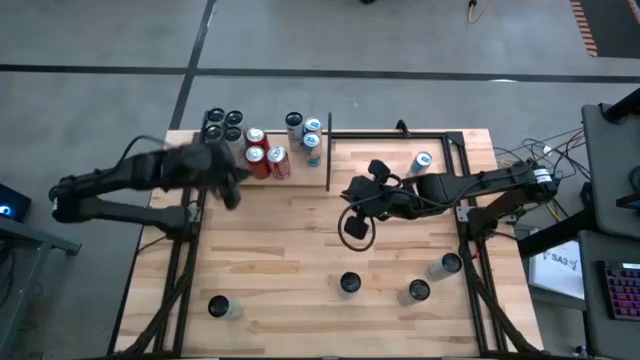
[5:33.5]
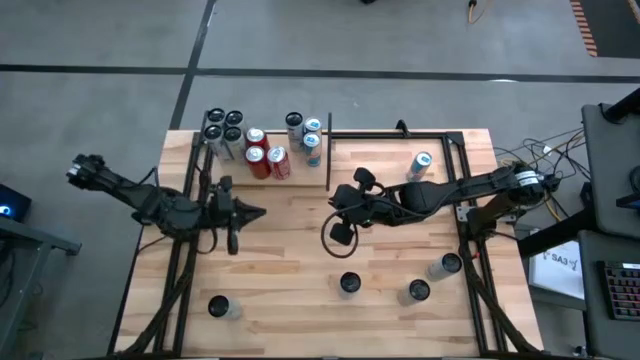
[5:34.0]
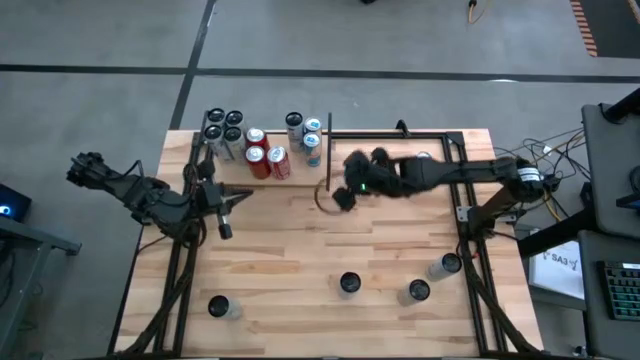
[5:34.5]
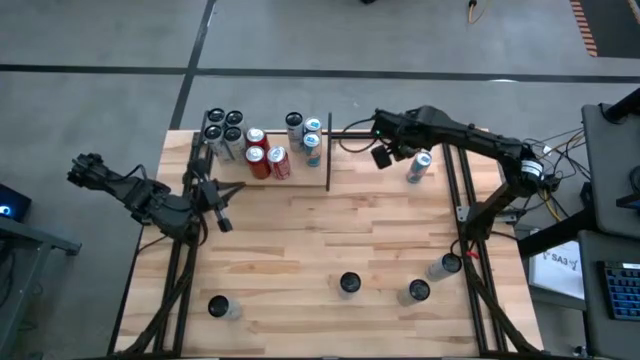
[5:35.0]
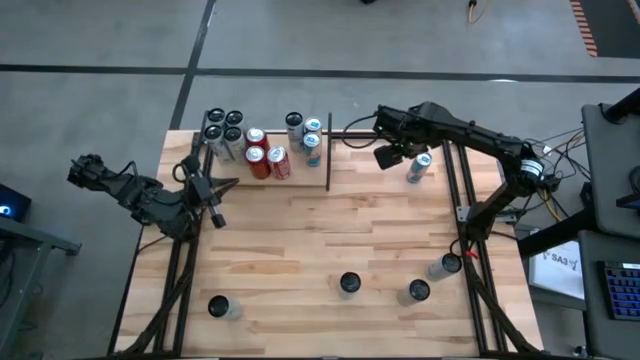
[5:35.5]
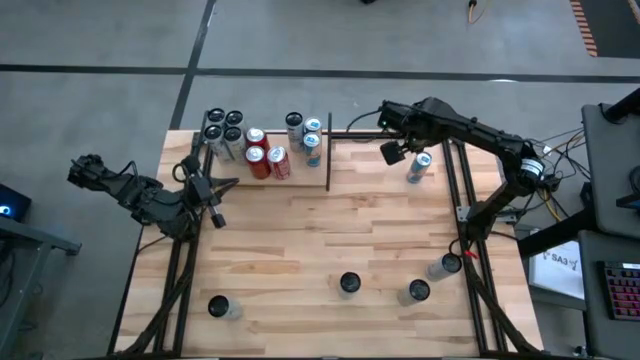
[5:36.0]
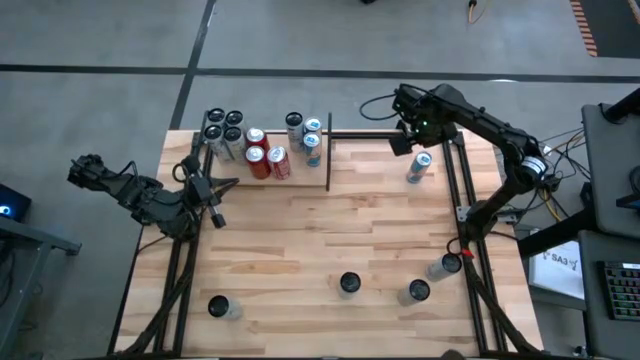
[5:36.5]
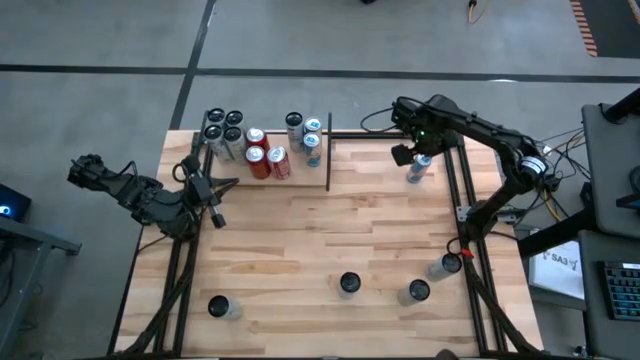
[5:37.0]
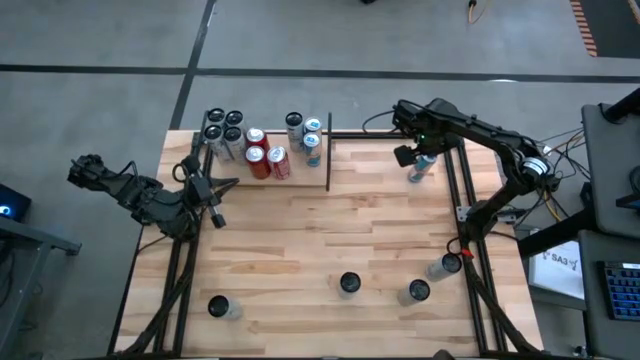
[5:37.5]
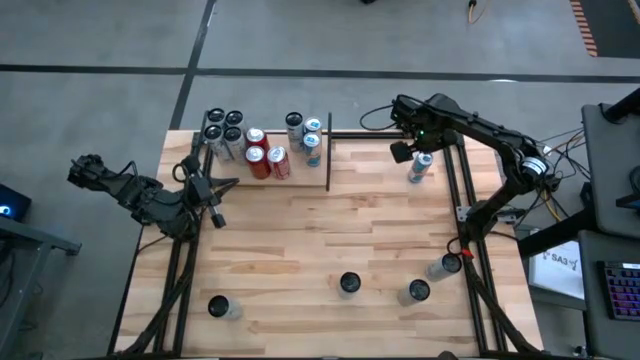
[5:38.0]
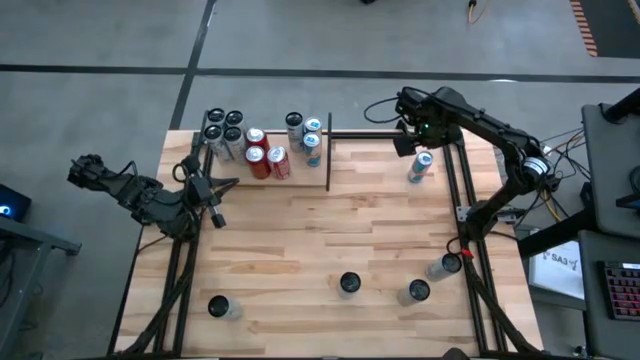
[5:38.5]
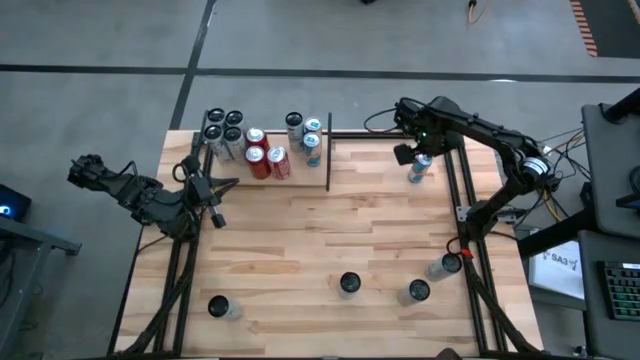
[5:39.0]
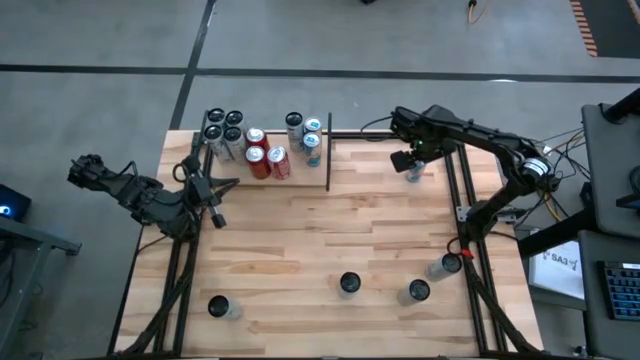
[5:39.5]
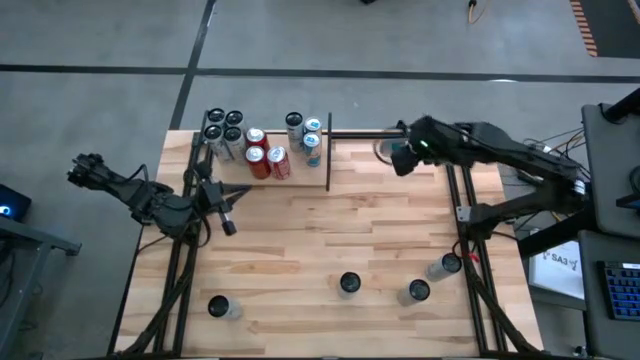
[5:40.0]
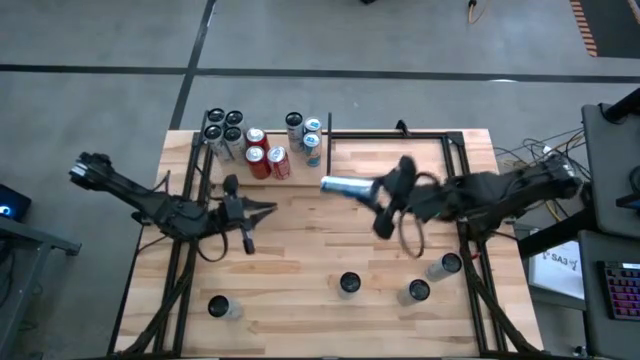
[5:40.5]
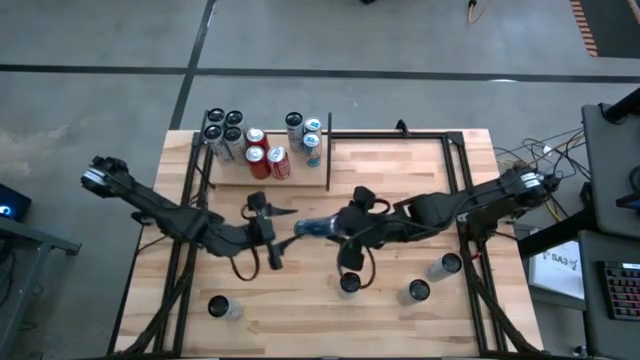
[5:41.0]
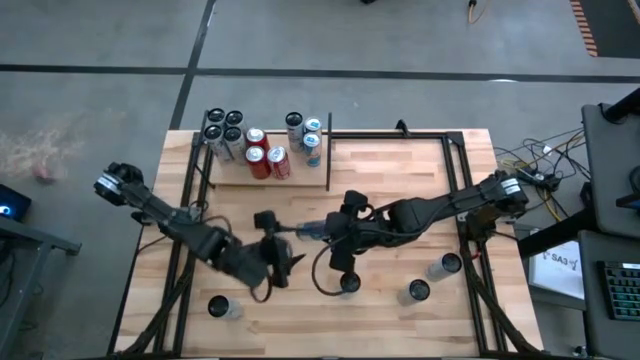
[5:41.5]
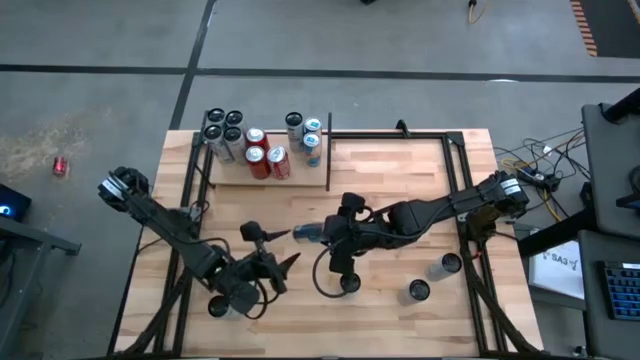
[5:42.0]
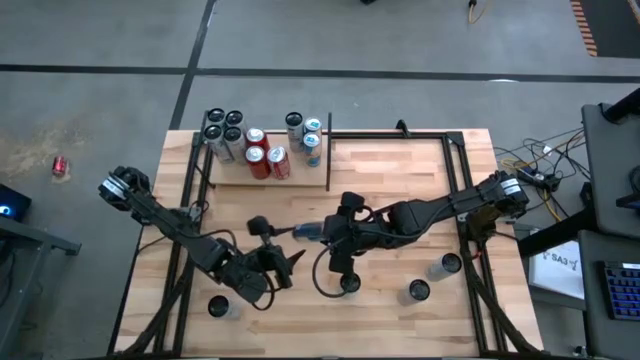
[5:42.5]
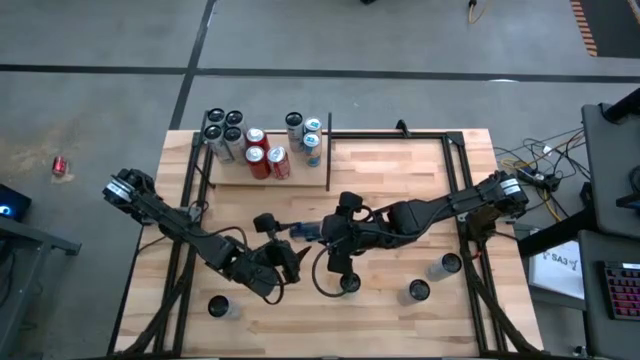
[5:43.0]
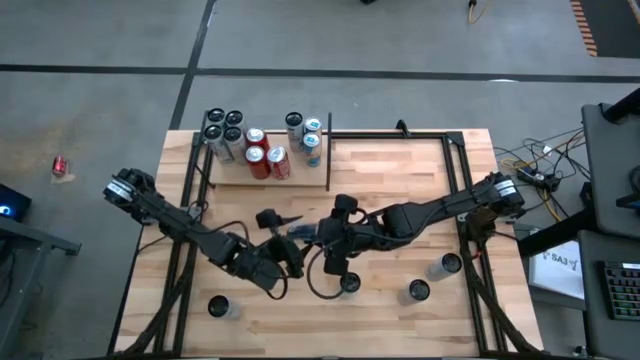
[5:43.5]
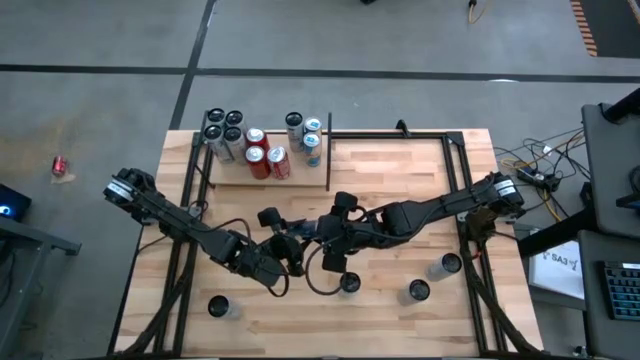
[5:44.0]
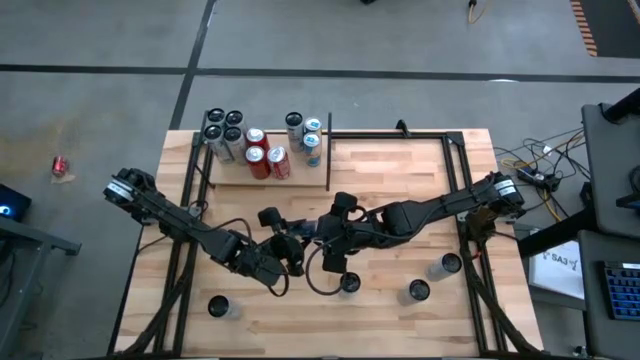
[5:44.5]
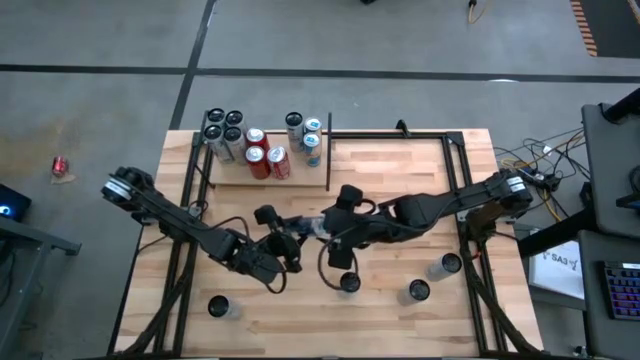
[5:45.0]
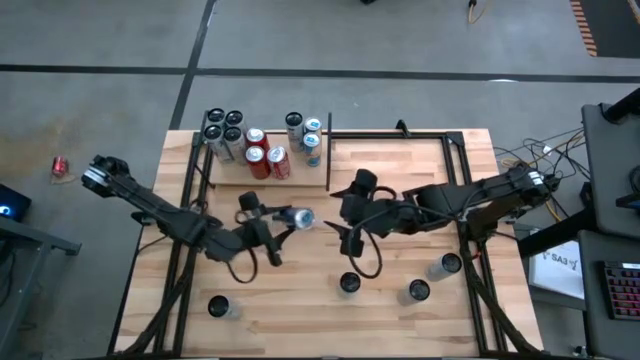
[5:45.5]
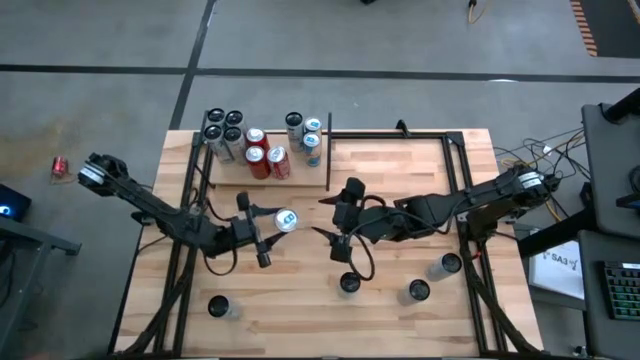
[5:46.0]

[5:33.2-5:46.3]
Task: Place canned beverage on shelf
Put the blue and silver soda can on the shelf aligned with the other blue and silver soda cans

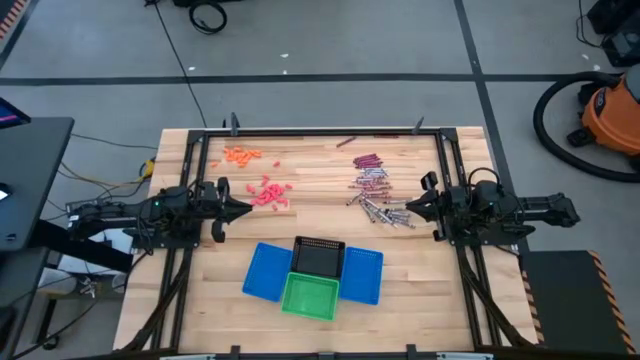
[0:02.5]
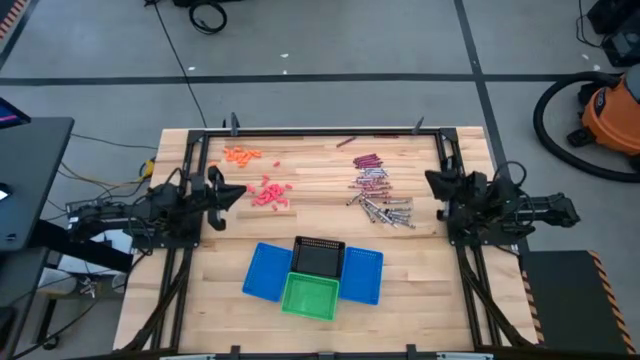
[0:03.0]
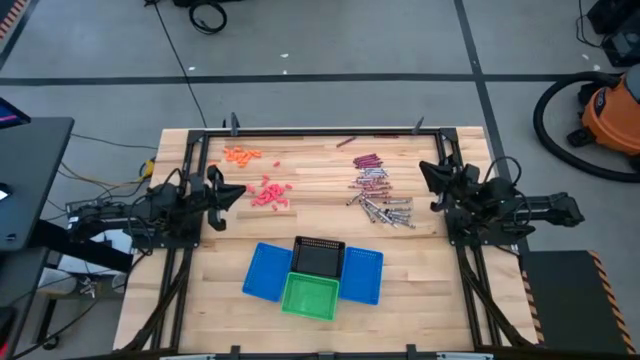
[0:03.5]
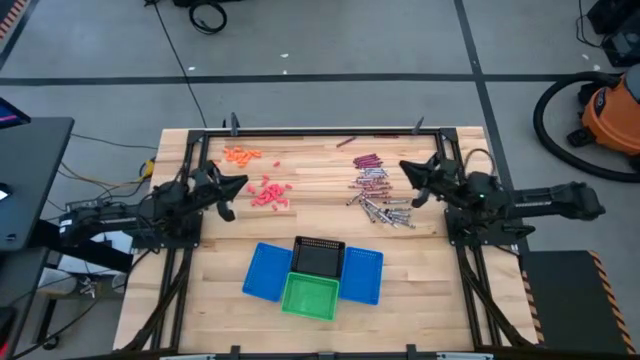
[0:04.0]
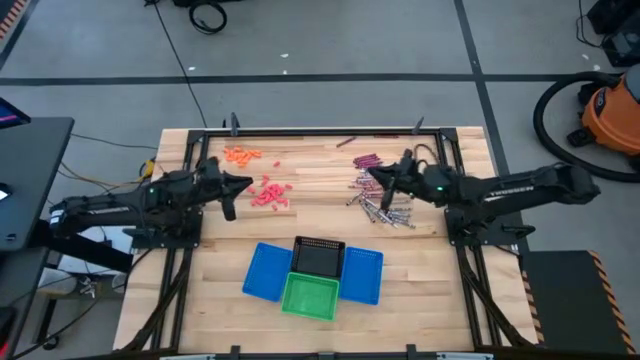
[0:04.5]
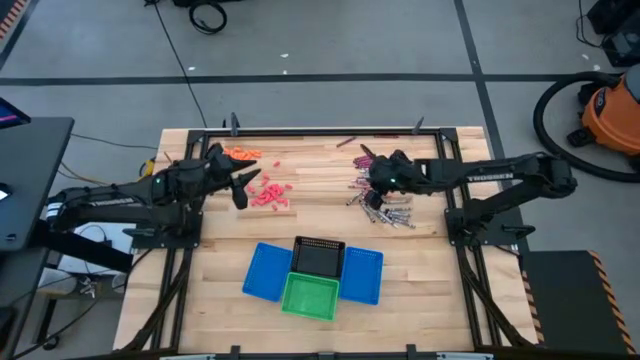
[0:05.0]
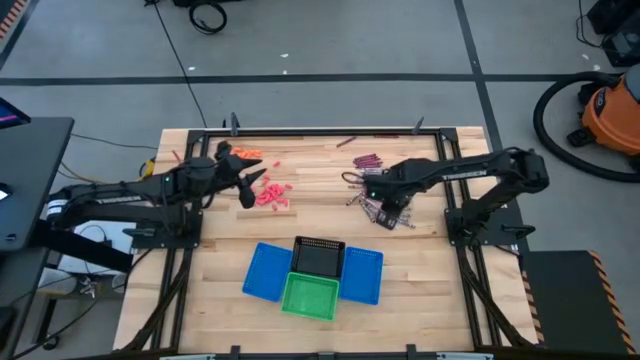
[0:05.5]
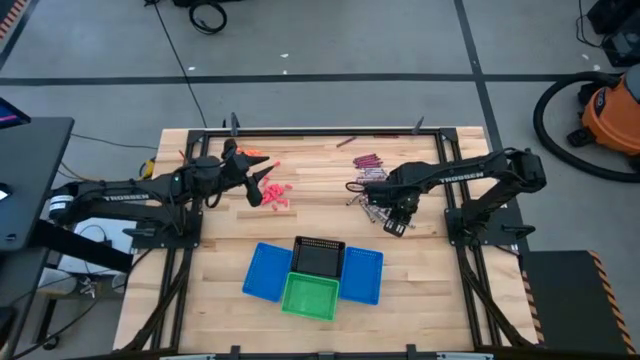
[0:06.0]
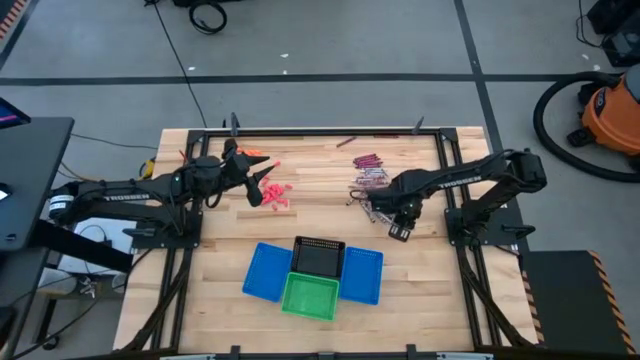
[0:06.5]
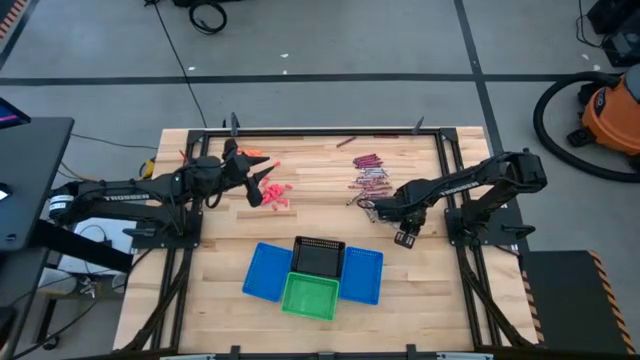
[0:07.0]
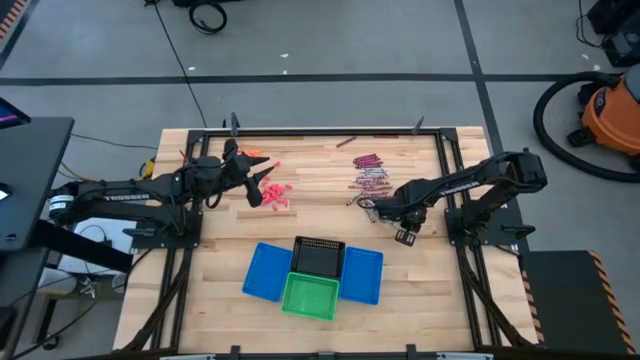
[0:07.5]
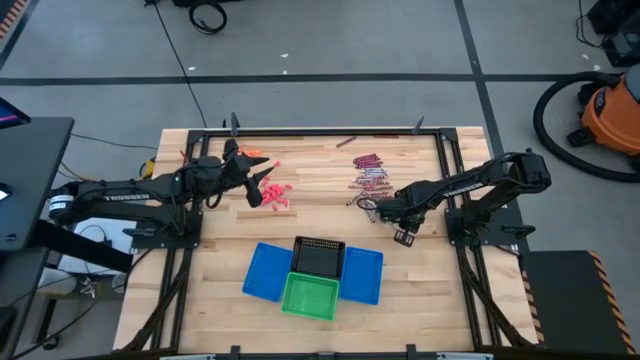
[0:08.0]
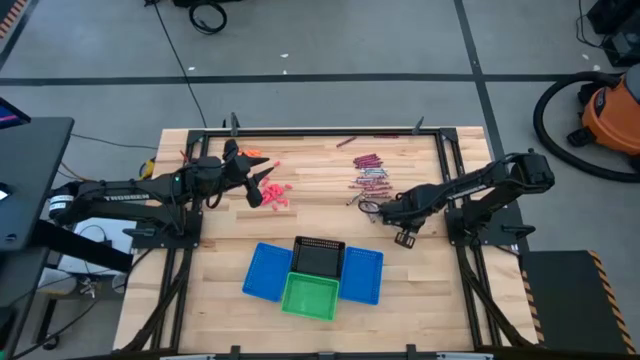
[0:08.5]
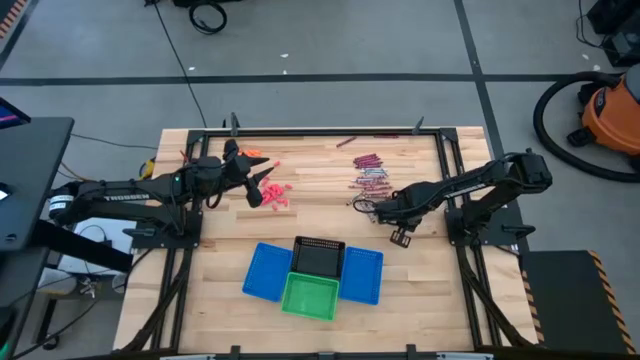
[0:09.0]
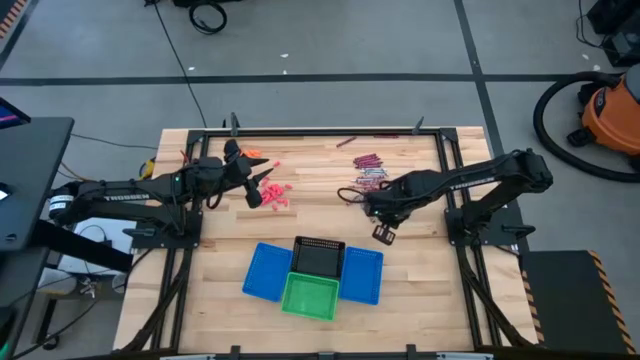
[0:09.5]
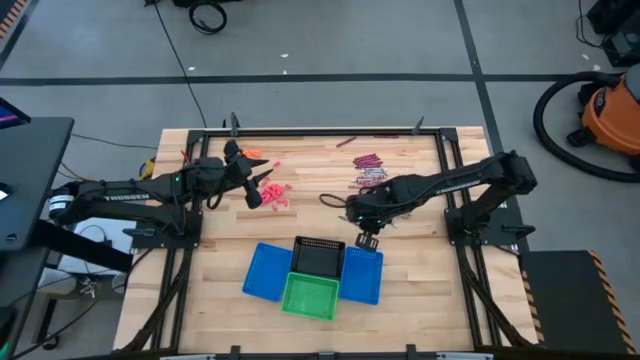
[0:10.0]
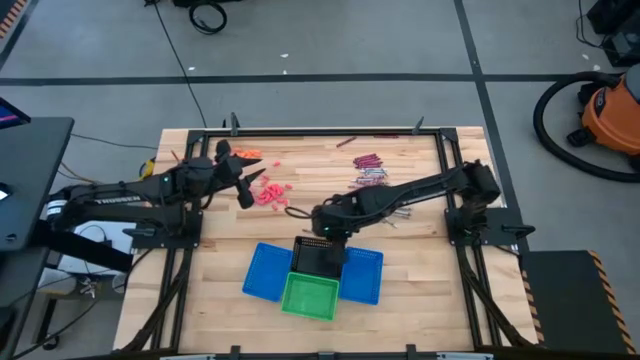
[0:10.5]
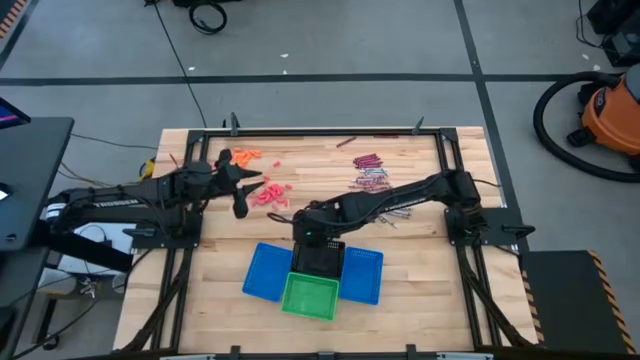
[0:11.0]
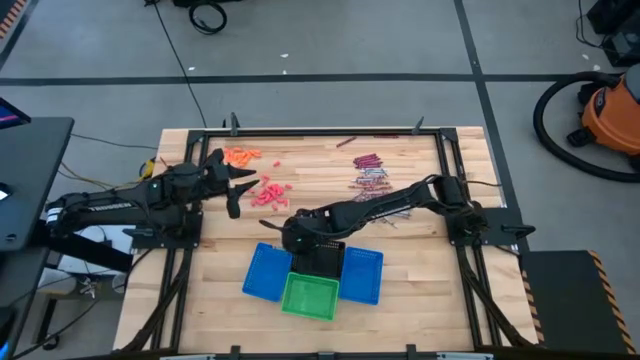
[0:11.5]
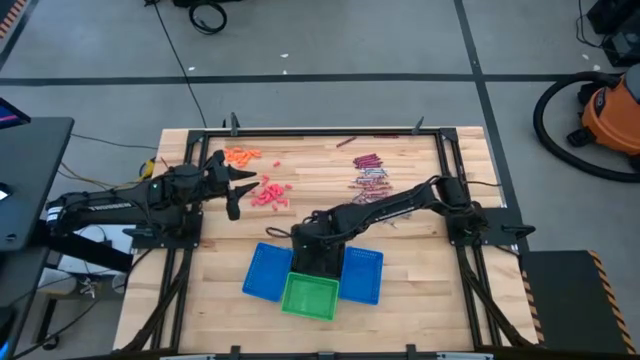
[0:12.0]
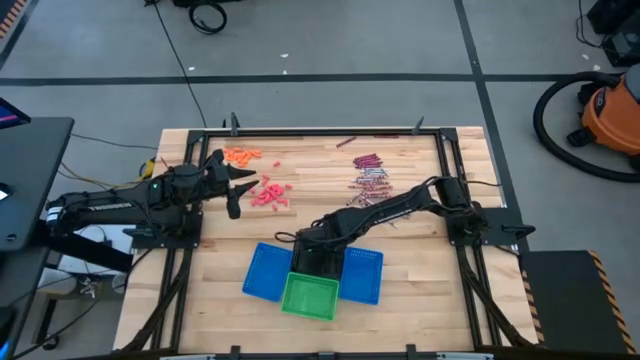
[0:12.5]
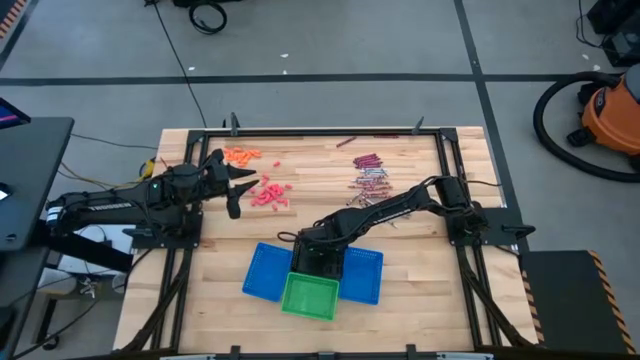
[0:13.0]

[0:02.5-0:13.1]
Task: Sort crayons
Put the black crayon into the black bin
